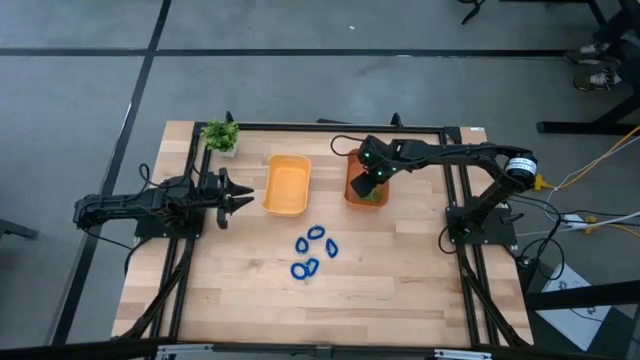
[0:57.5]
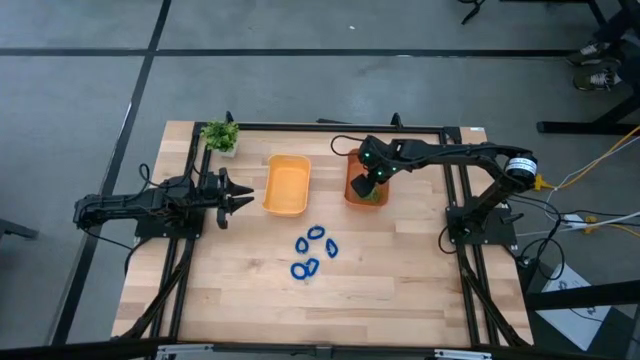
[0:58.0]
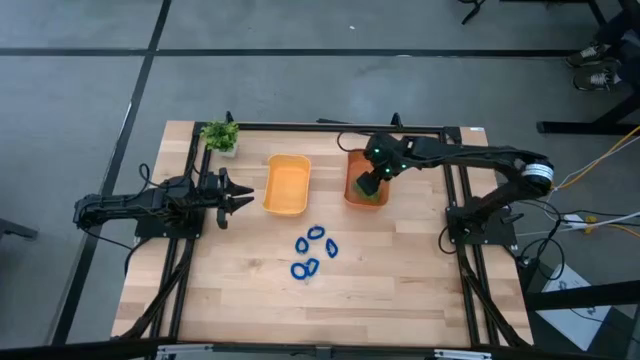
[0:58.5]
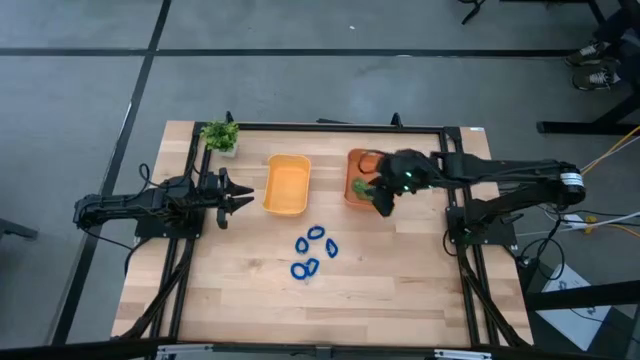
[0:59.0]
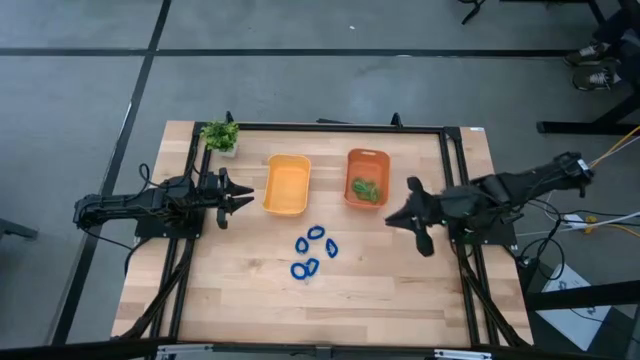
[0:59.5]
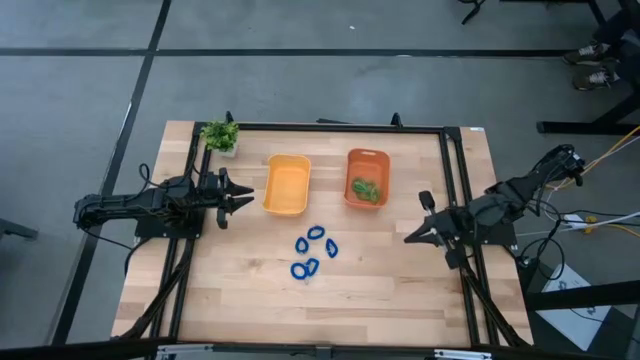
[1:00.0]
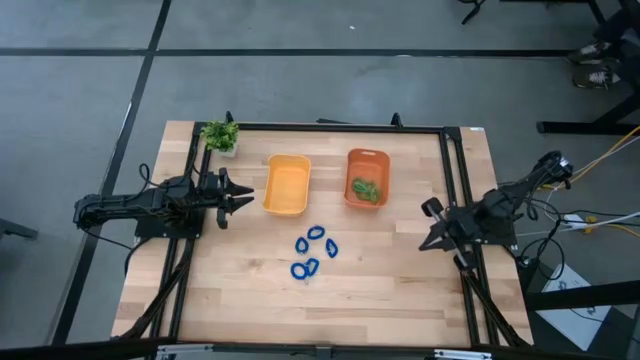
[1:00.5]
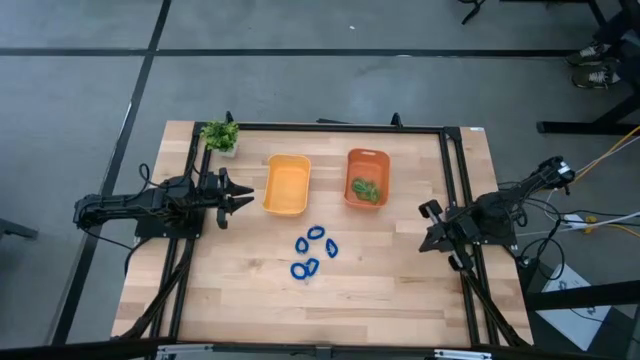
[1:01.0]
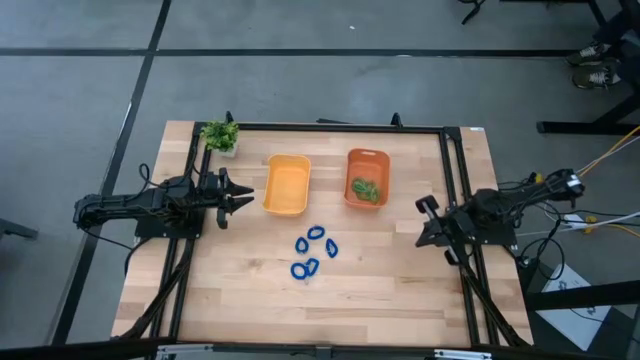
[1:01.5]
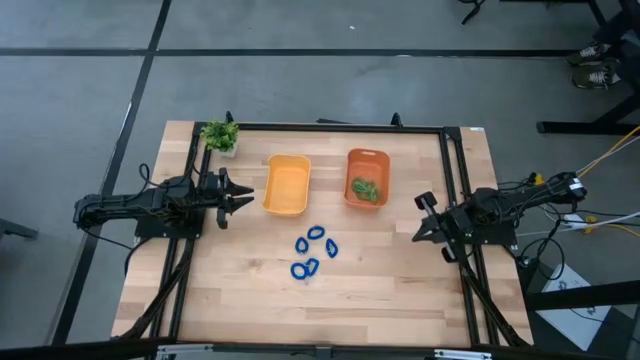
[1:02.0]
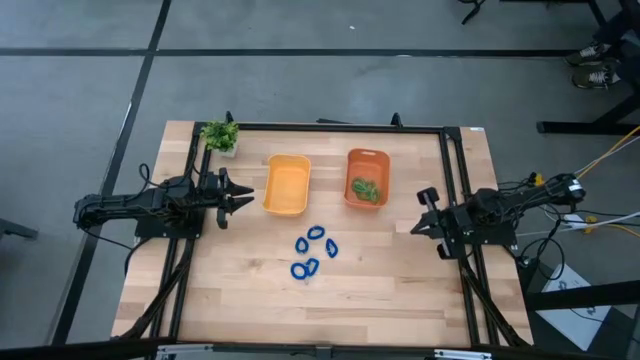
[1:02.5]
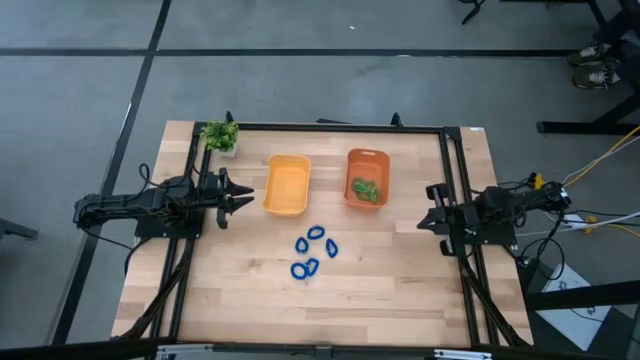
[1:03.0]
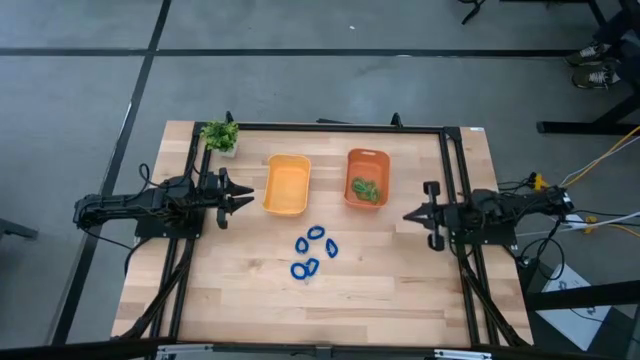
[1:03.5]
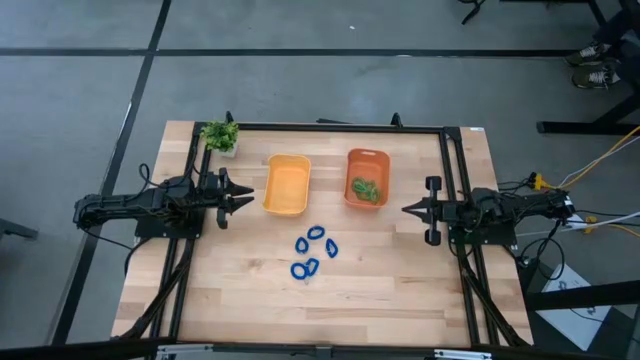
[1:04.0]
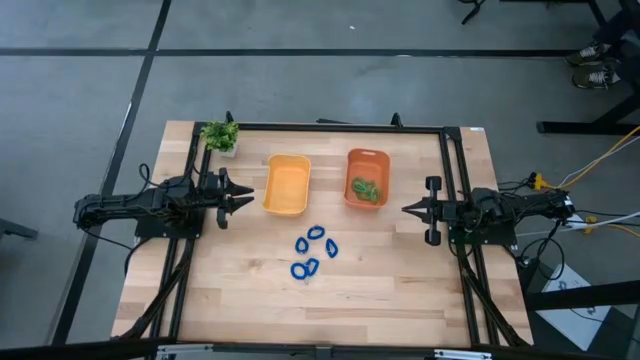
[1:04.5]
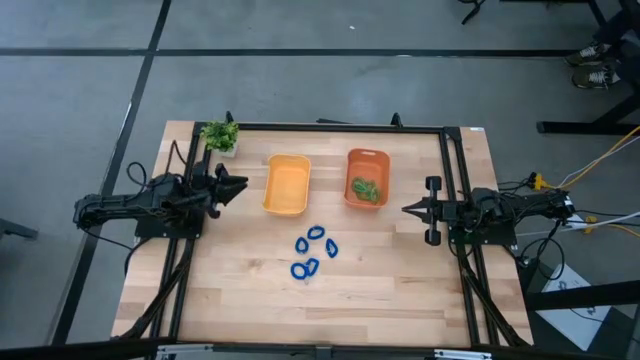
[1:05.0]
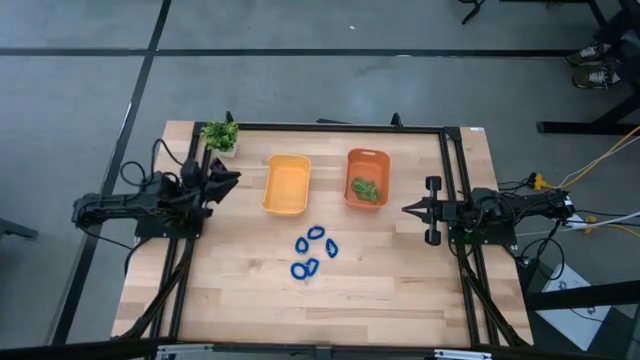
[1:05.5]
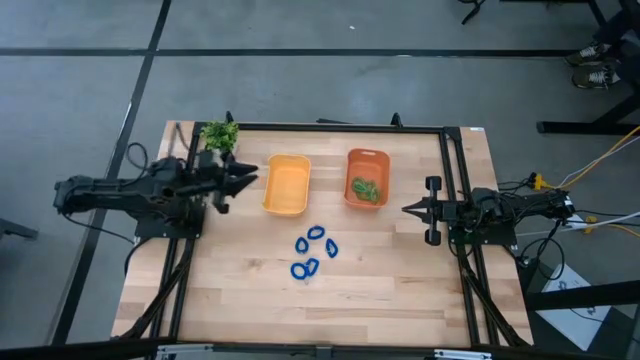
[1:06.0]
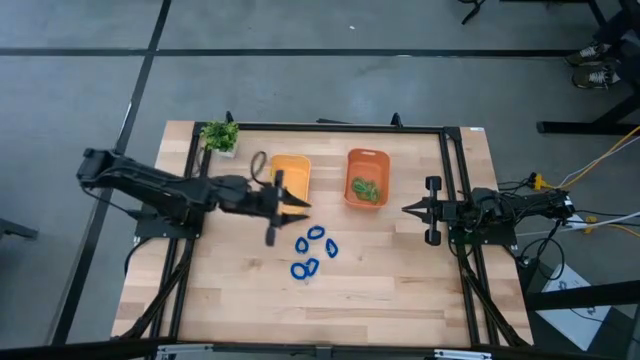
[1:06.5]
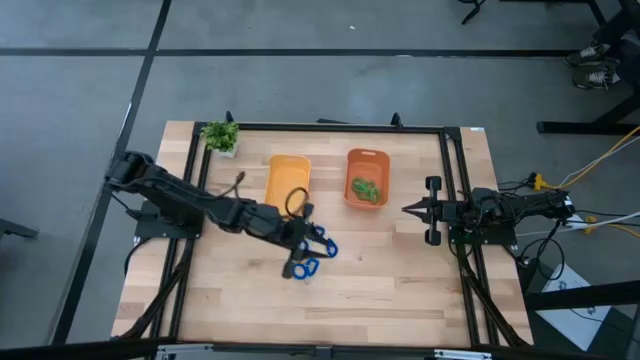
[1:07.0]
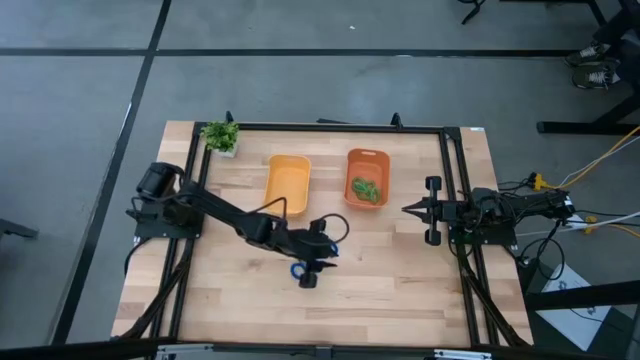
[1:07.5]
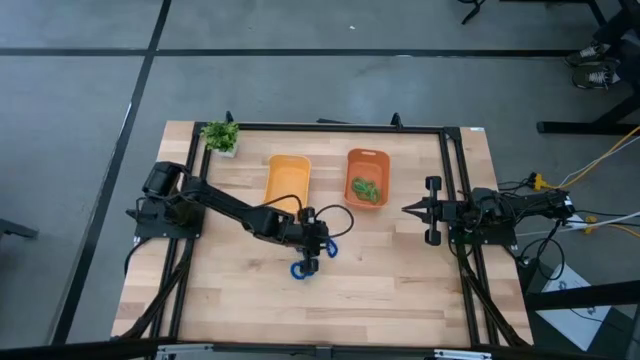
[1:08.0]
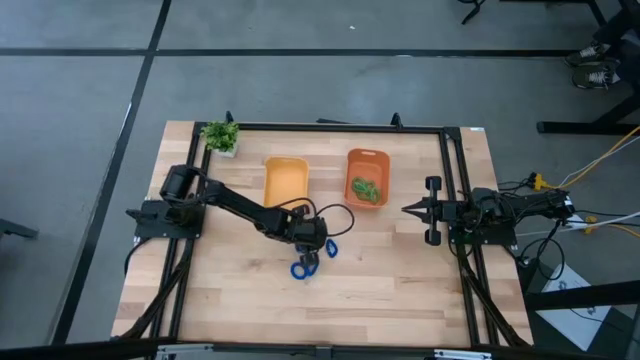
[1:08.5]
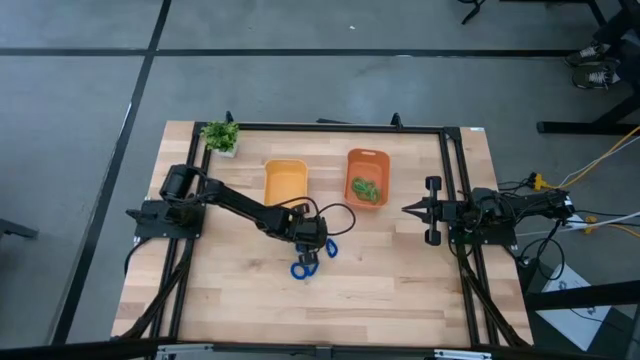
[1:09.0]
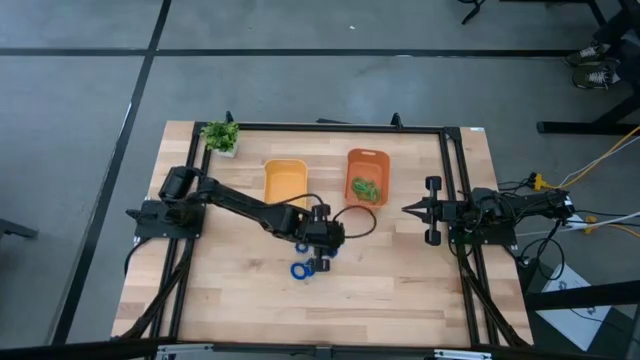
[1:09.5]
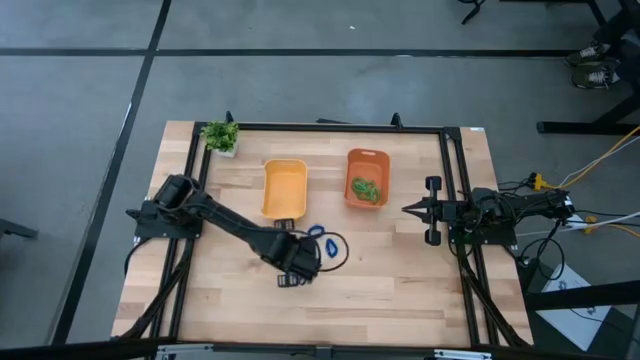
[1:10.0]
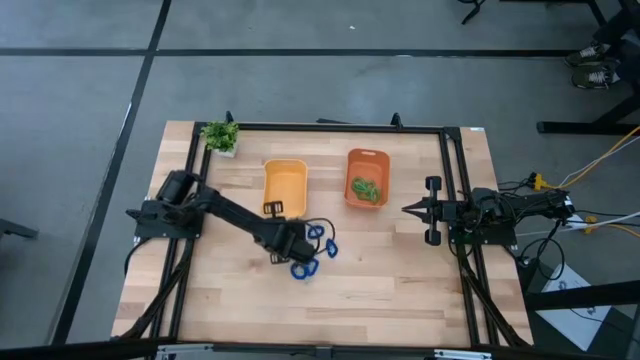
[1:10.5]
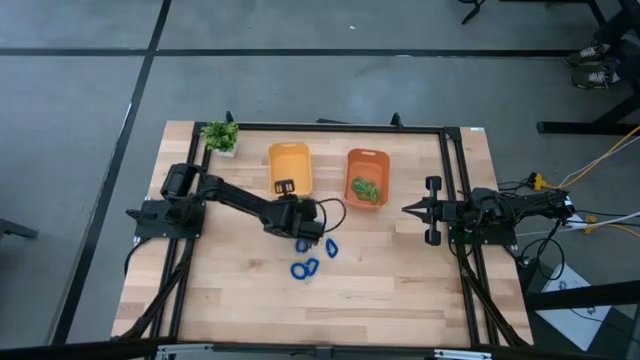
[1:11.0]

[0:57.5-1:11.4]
Task: Sort spring keychains
Adjust the yellow bin

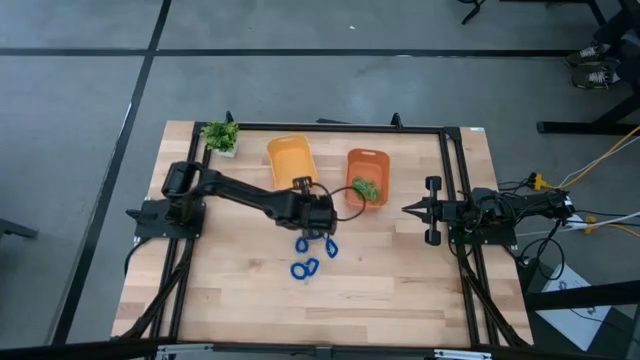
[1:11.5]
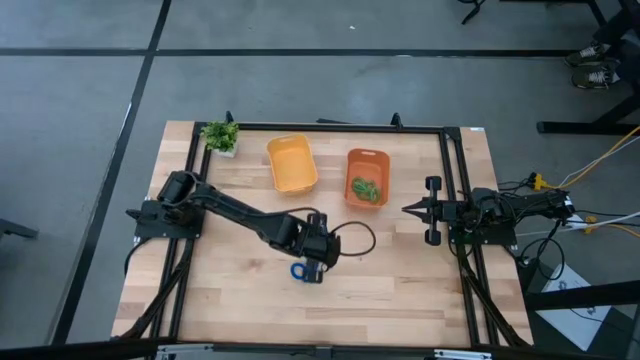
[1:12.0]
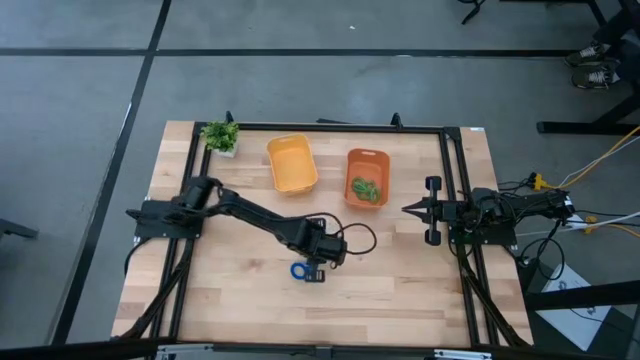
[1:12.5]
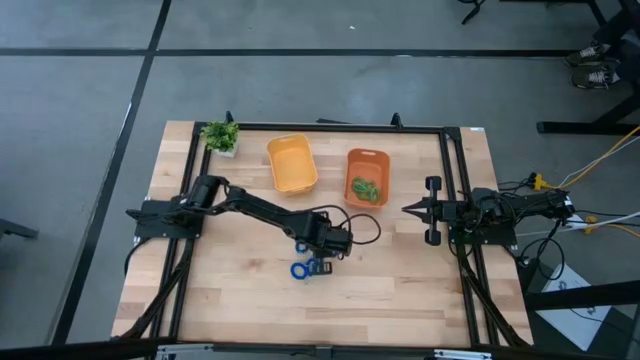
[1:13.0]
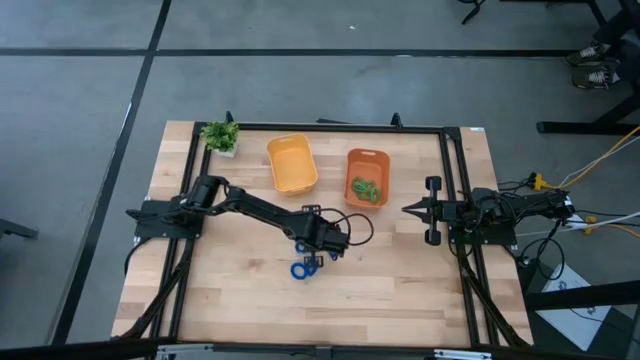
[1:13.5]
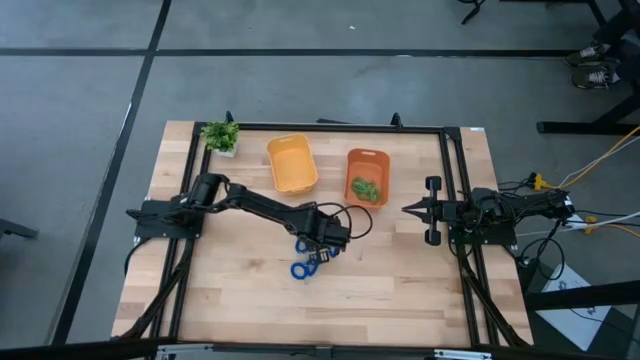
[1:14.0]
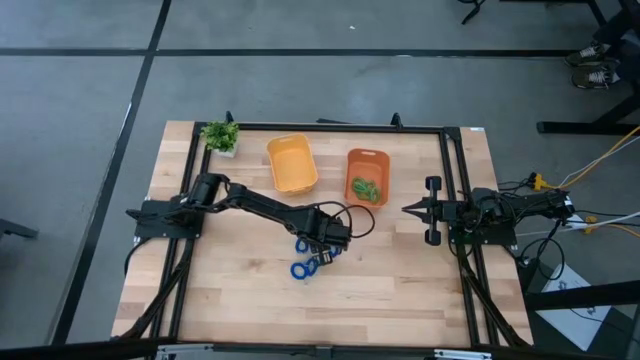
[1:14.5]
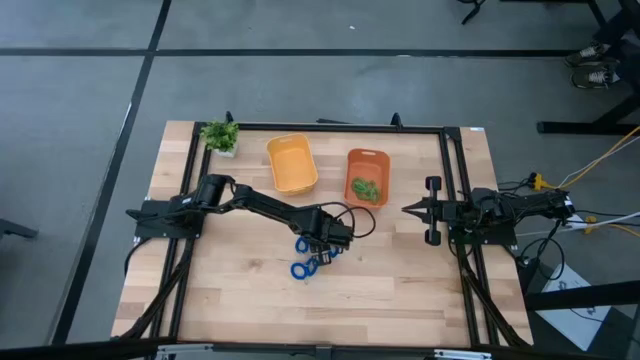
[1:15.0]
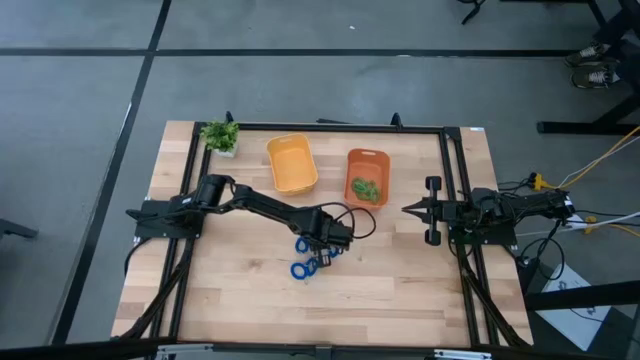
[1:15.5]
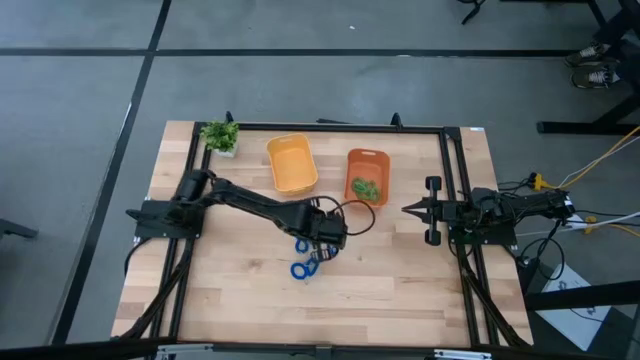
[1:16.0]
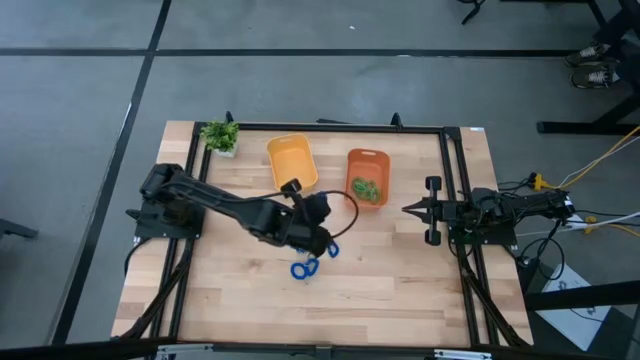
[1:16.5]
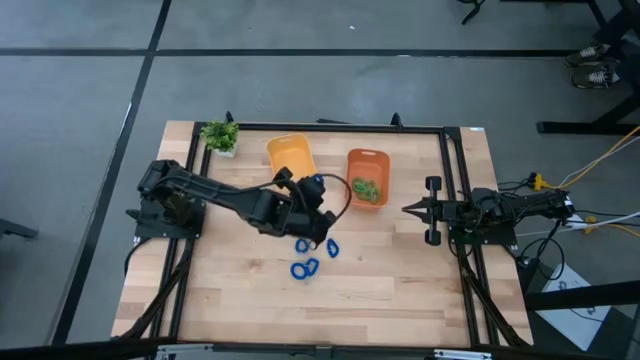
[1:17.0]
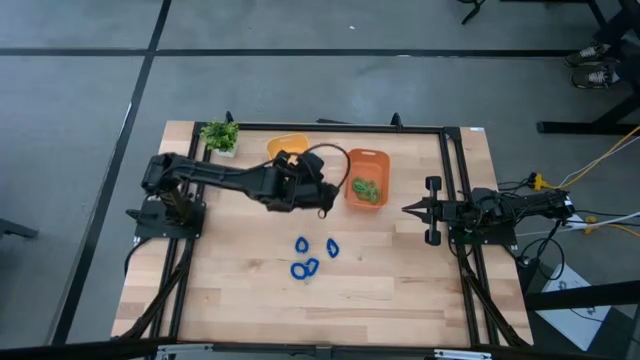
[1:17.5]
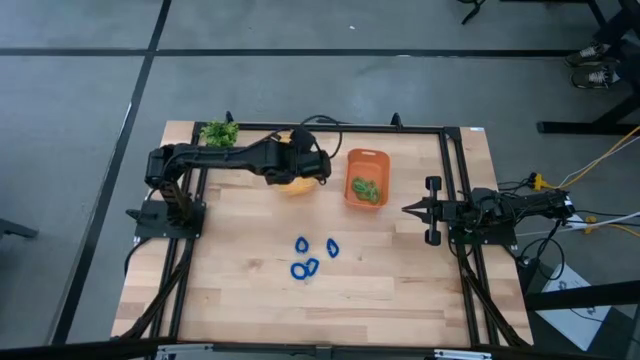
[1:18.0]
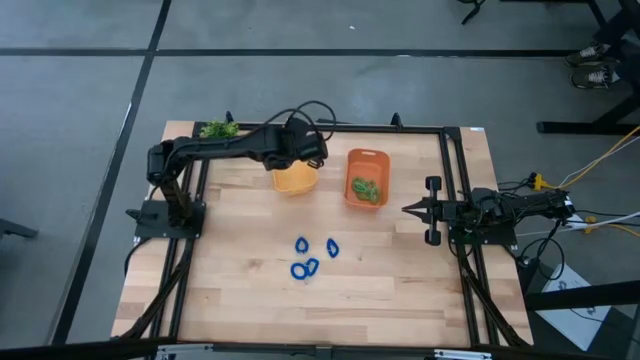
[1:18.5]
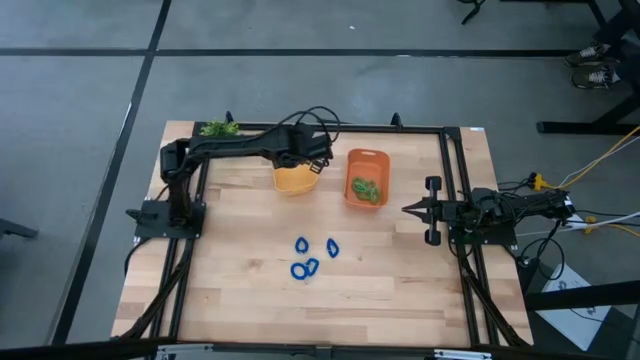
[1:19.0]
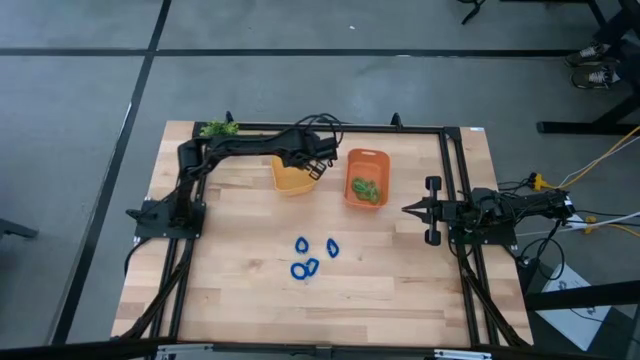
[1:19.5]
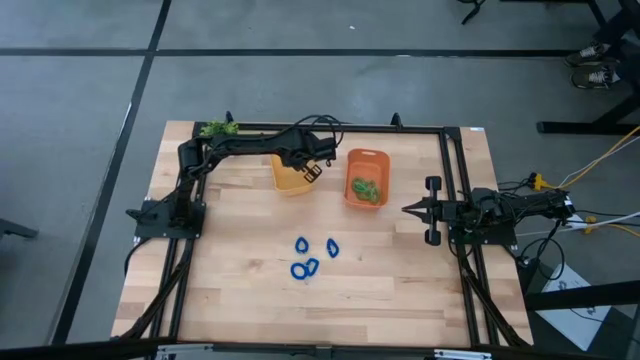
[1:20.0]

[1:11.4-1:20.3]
Put the blue spring keychain into the yellow bin
